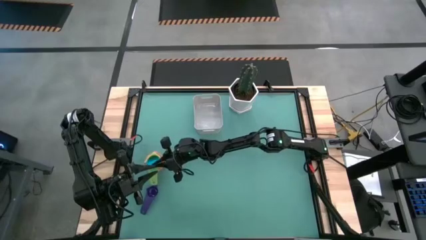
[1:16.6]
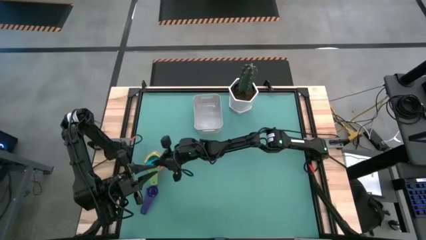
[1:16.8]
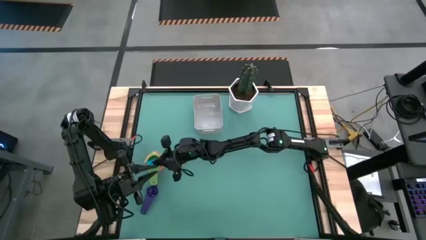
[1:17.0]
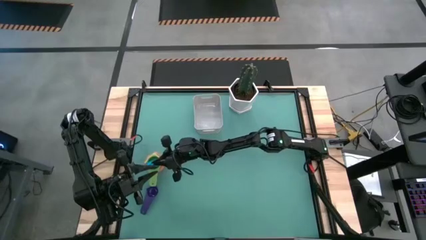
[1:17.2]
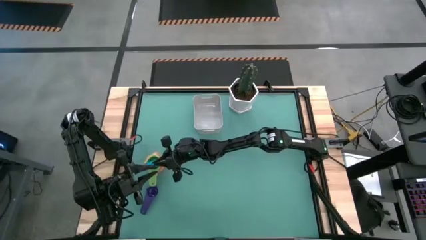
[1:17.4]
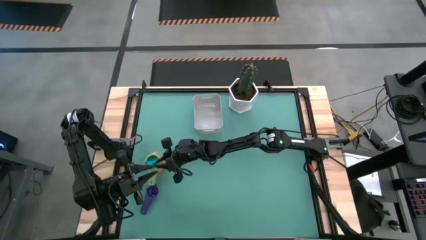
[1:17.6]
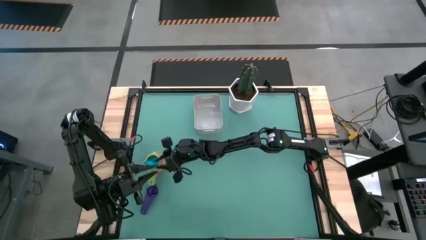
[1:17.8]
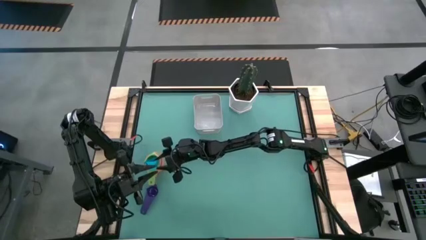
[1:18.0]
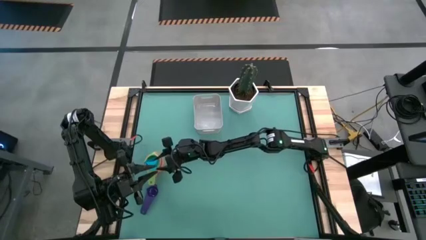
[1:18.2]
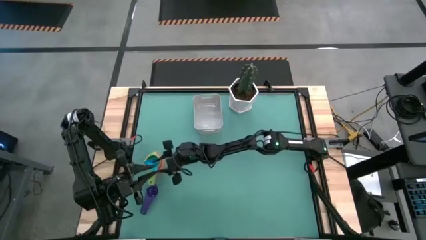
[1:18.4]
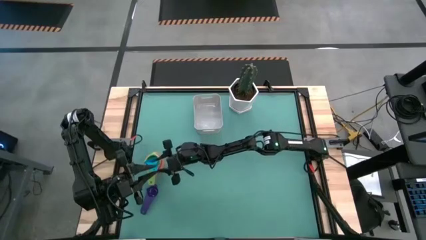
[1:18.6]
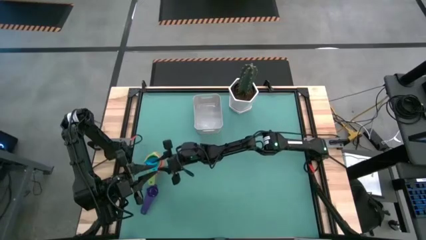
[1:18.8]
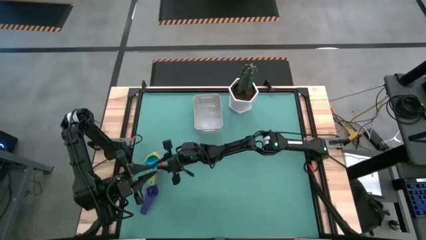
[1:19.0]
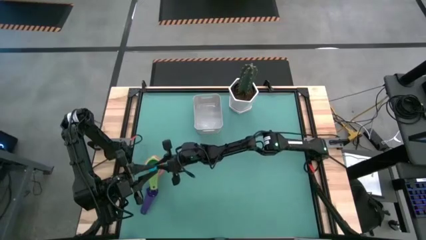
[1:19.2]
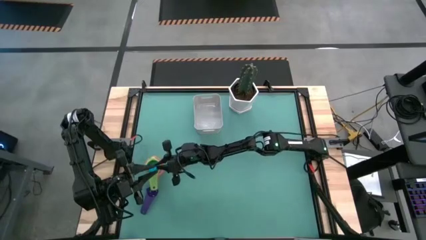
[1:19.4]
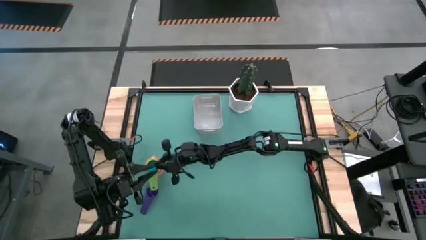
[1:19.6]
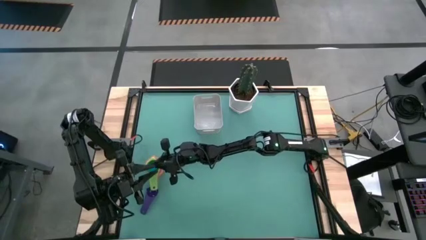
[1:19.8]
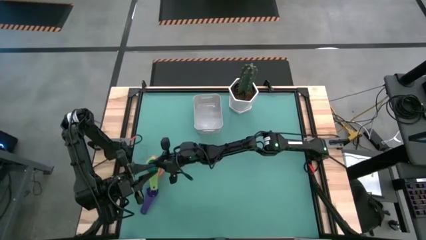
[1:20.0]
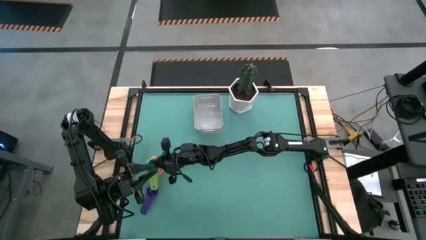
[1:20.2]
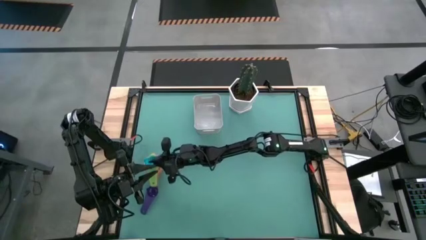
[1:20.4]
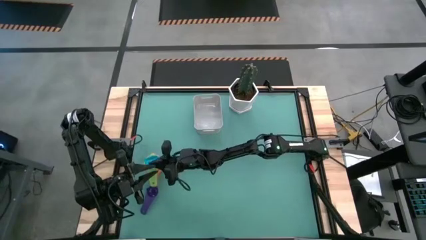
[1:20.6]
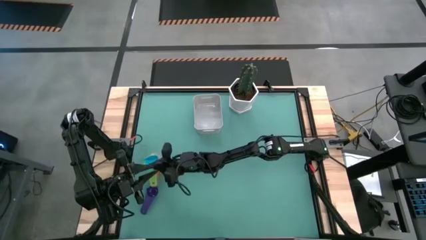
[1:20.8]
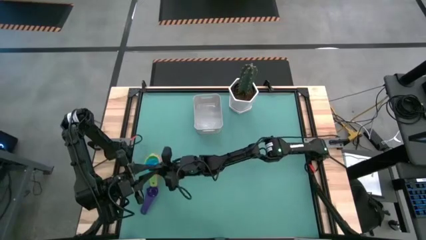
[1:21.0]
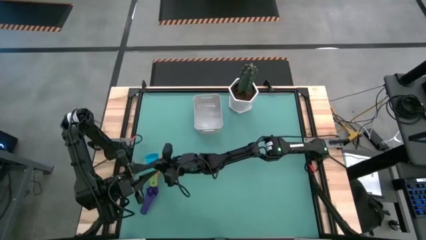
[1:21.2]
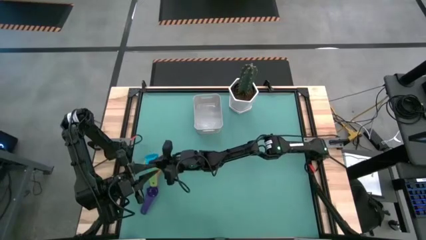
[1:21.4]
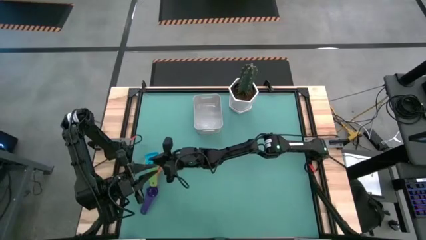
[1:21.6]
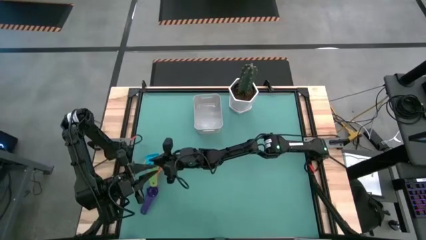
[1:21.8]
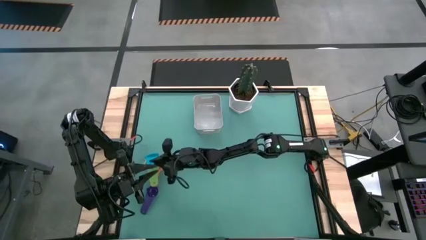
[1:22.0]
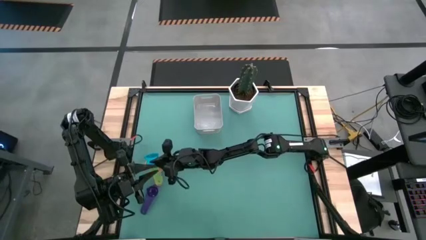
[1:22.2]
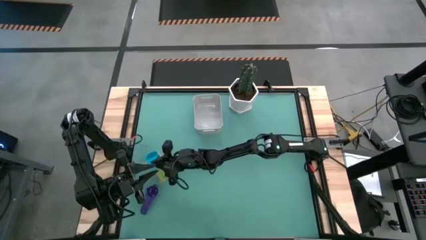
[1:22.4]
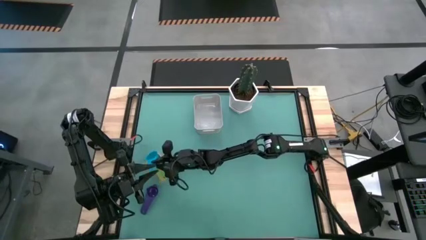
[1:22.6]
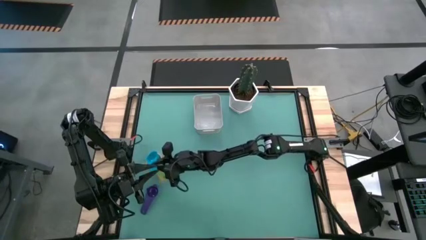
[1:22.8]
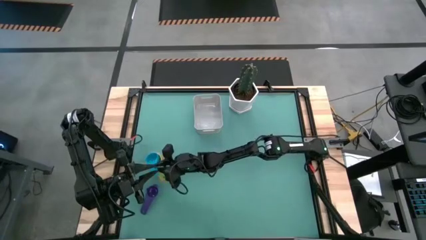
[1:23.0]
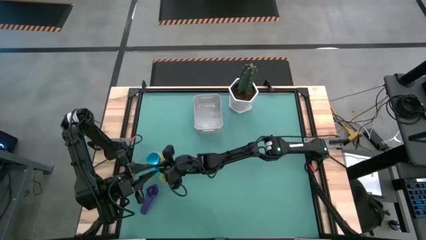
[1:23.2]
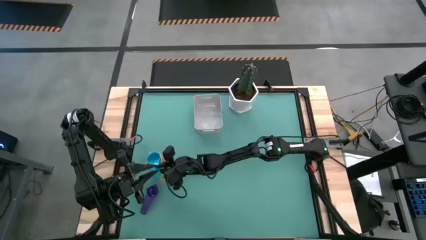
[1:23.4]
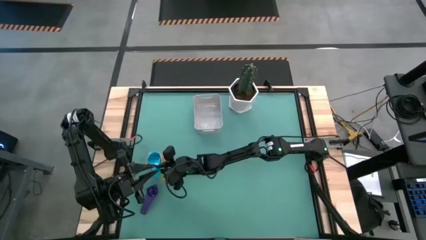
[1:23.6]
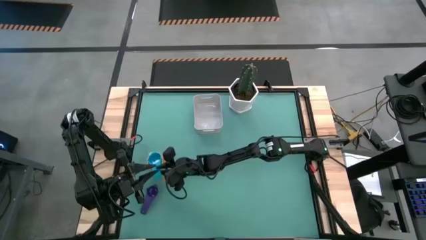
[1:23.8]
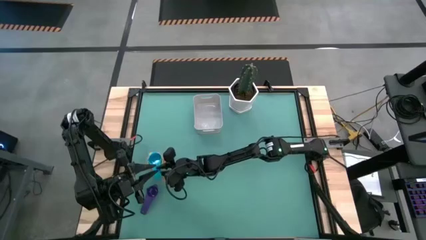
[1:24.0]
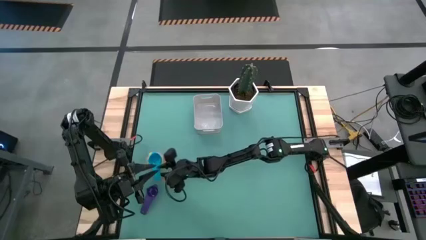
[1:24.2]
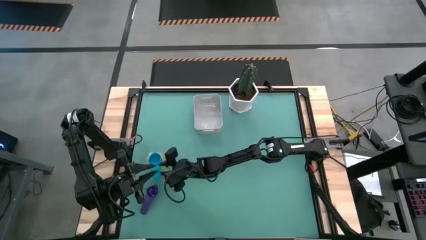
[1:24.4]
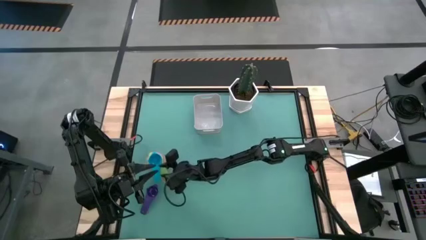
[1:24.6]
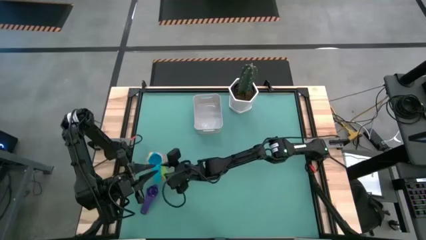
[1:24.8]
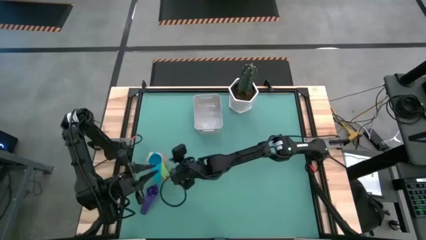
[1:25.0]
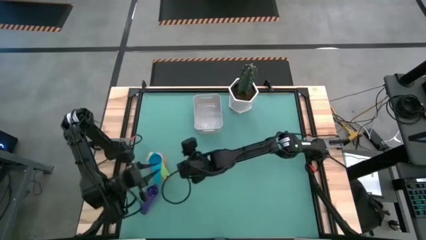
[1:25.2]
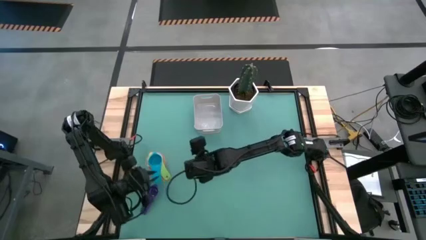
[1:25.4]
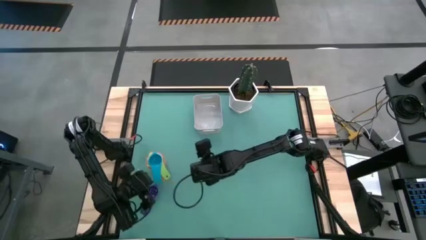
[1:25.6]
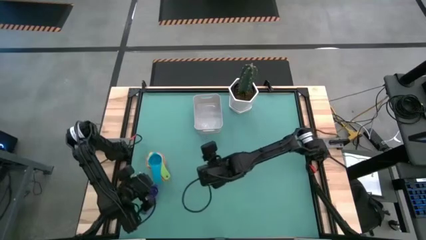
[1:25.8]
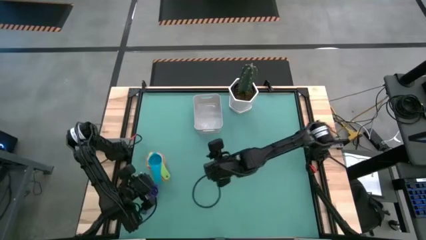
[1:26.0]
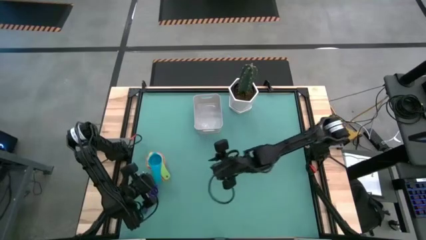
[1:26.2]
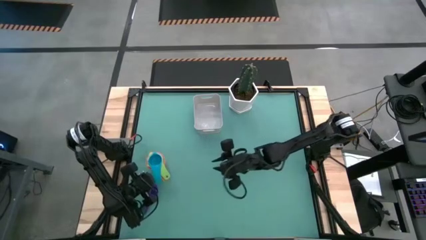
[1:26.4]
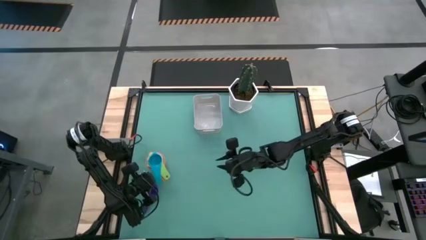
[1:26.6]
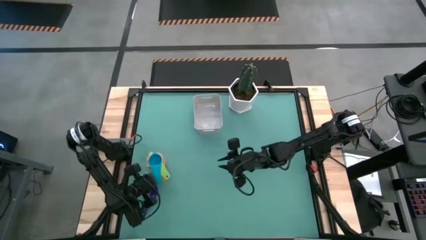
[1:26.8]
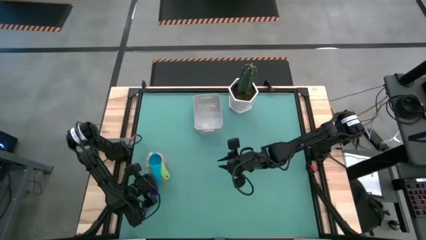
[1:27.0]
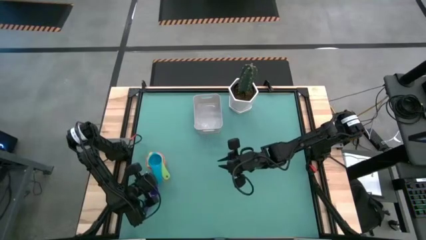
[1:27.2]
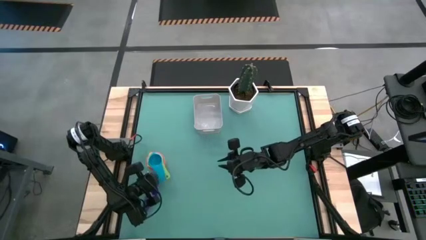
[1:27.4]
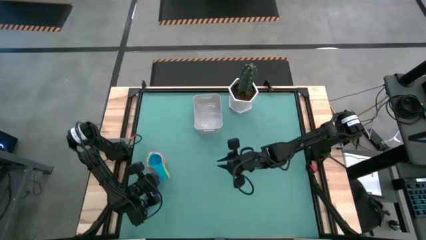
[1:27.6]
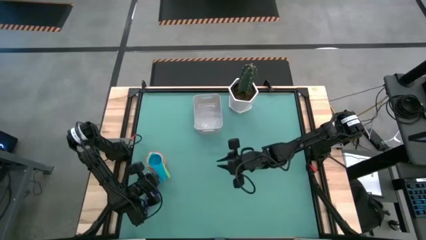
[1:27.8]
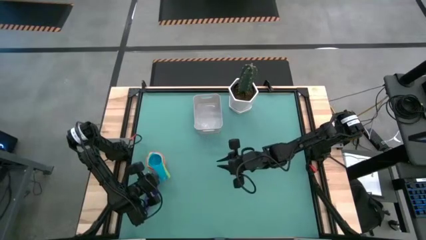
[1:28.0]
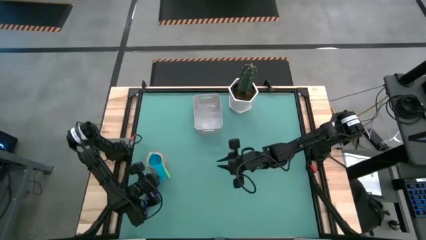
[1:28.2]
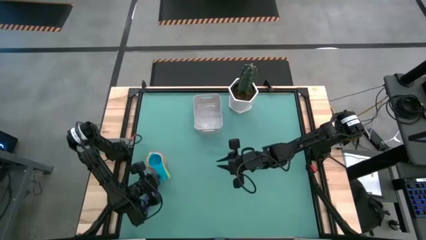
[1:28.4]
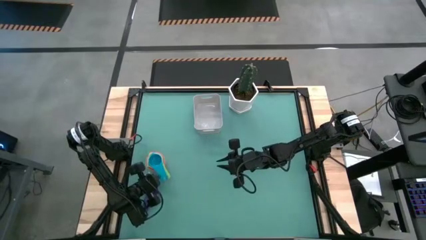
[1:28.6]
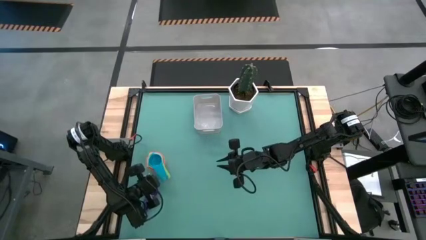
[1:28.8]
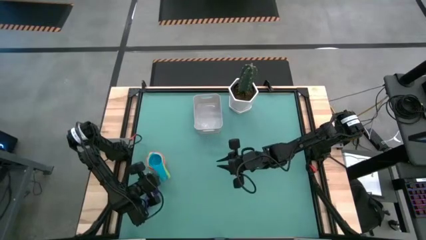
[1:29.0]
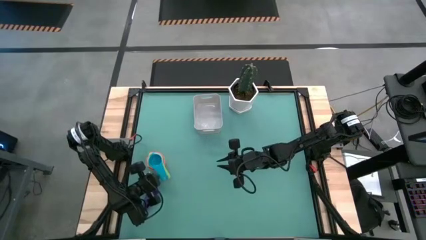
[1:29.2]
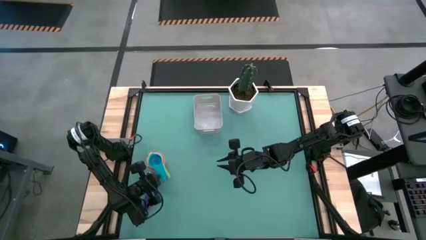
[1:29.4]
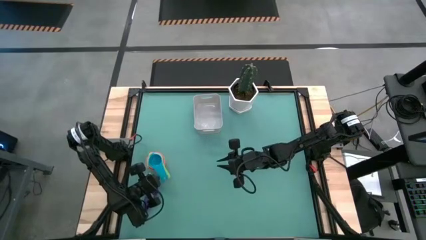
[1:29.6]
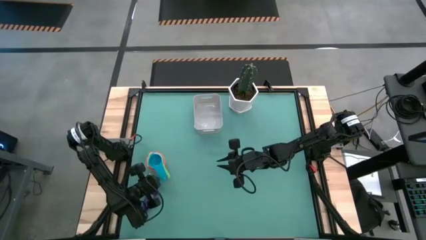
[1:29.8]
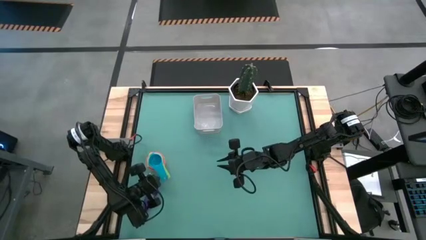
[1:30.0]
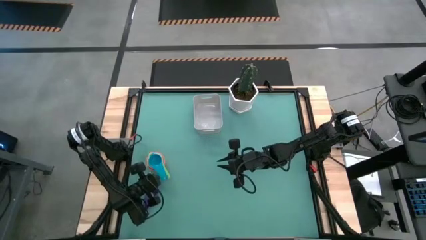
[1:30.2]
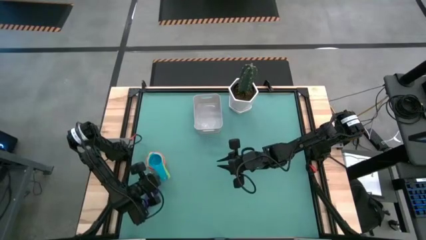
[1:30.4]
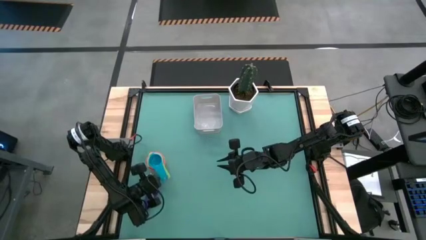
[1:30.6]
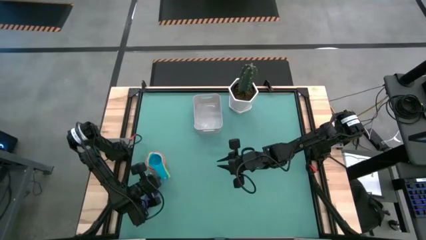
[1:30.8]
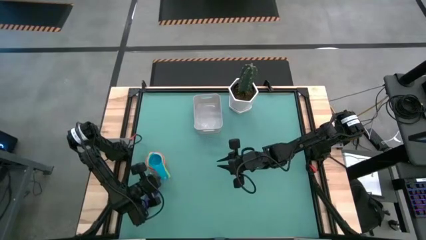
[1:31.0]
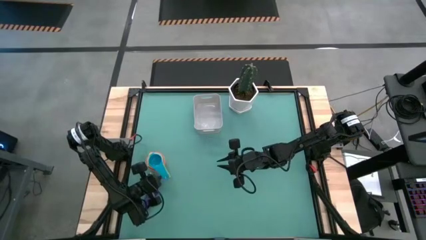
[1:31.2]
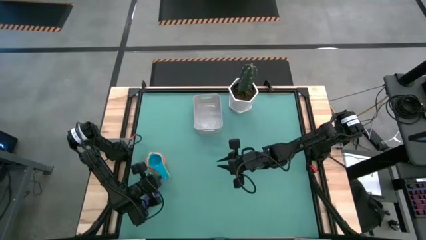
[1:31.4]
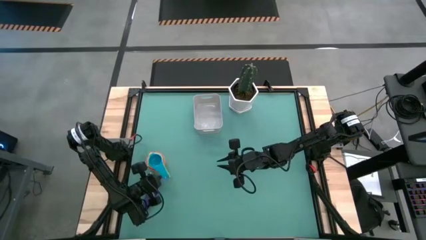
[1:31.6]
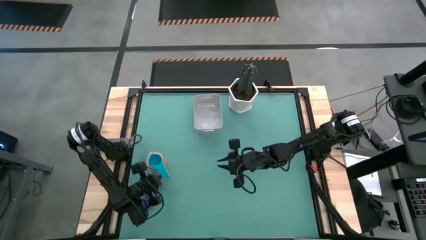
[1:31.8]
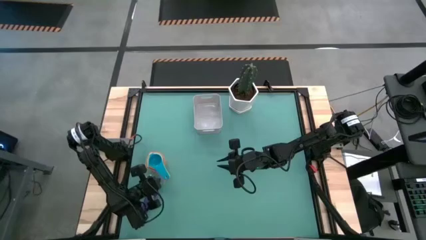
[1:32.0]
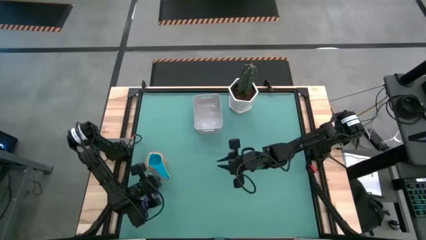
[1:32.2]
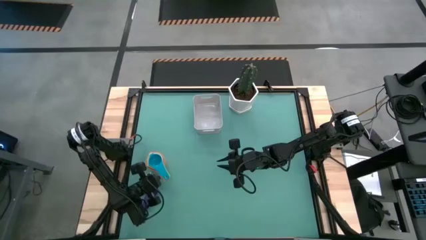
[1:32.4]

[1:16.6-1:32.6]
Task: Nest measuring cups in basket
Stack the blue measuring cup on top of the green measuring cup
